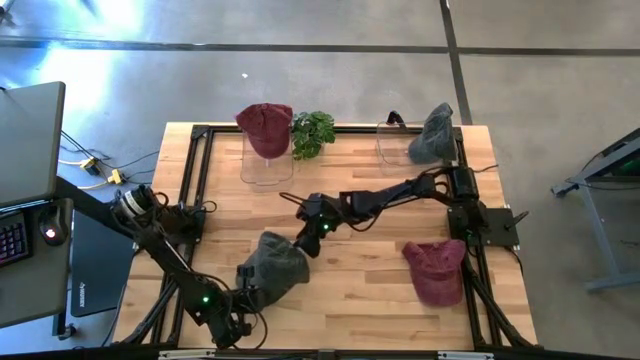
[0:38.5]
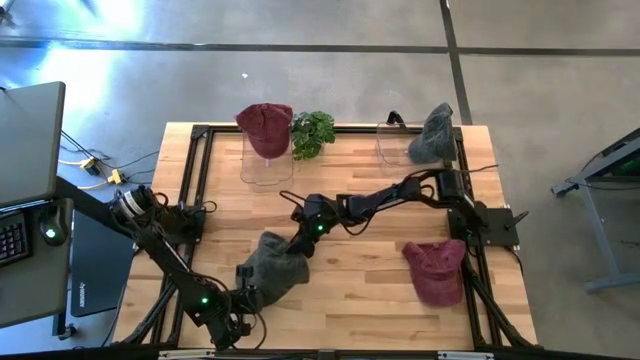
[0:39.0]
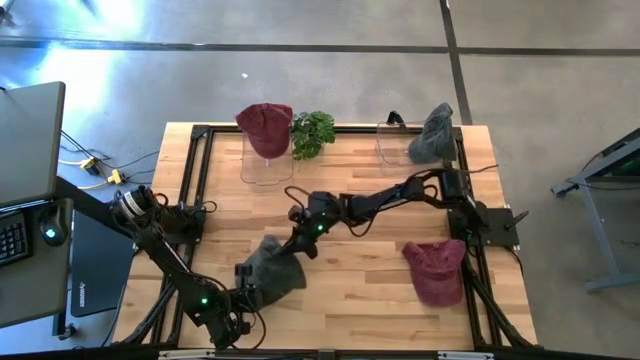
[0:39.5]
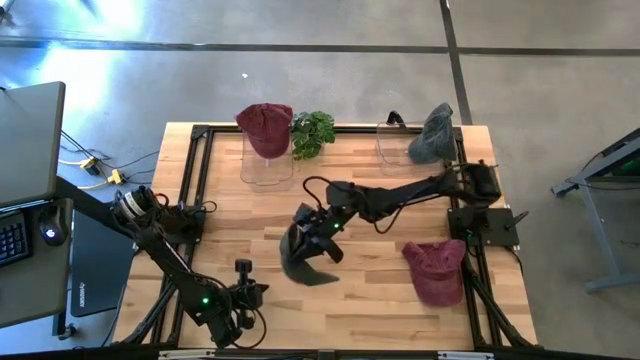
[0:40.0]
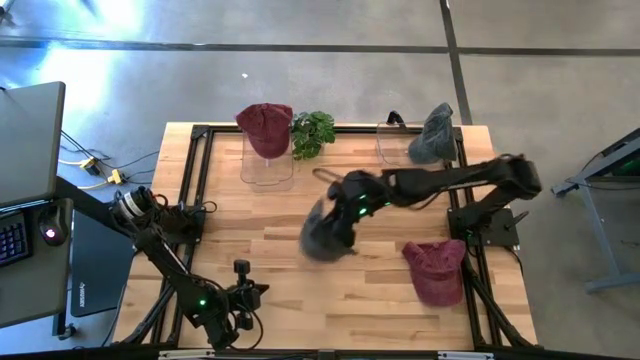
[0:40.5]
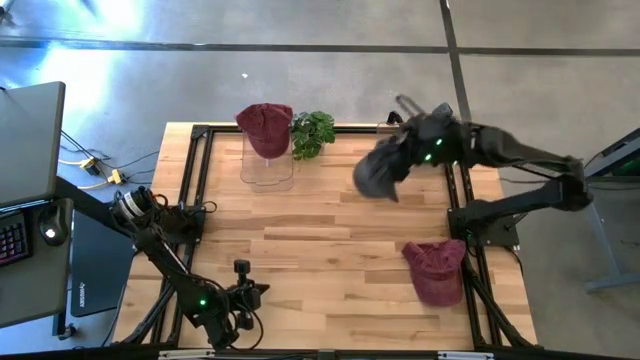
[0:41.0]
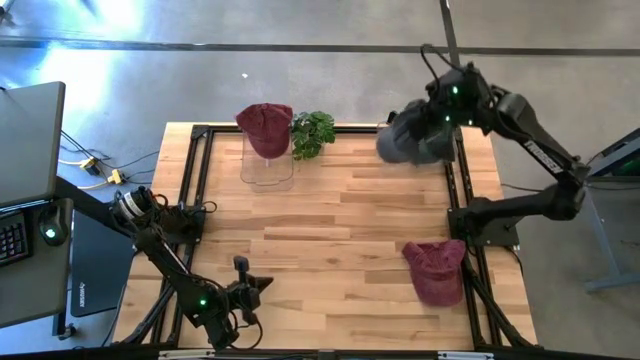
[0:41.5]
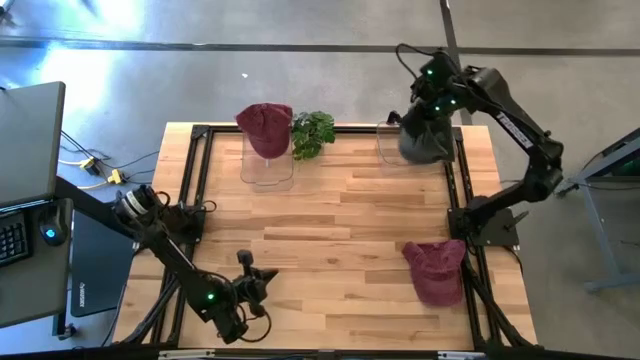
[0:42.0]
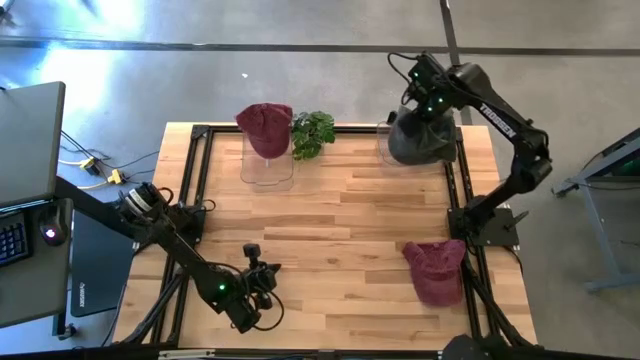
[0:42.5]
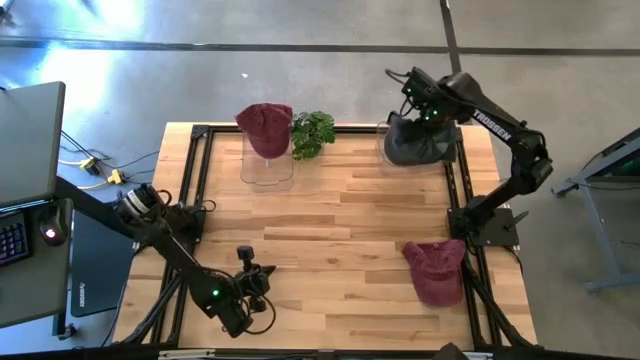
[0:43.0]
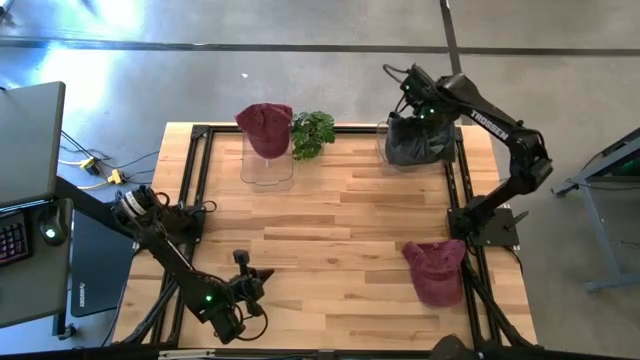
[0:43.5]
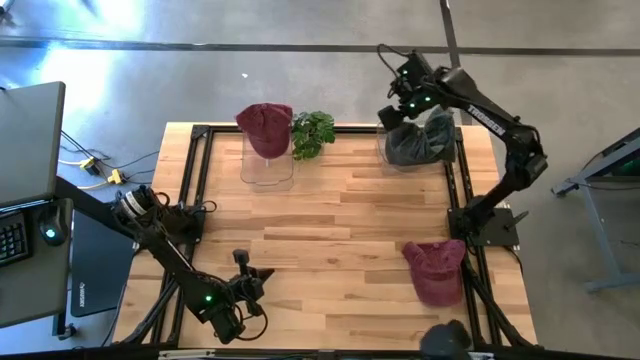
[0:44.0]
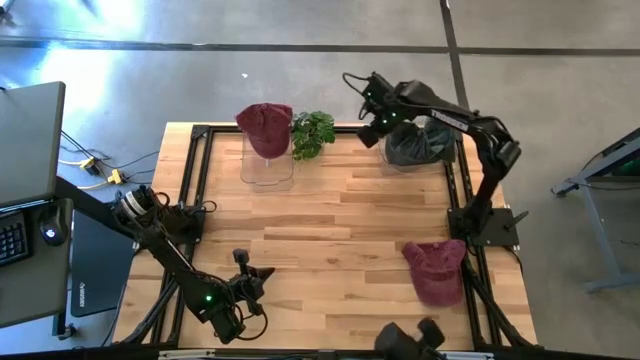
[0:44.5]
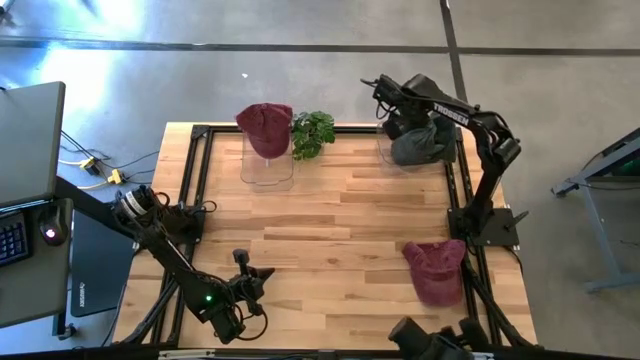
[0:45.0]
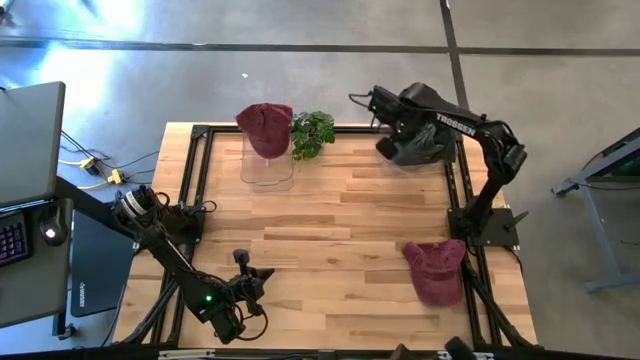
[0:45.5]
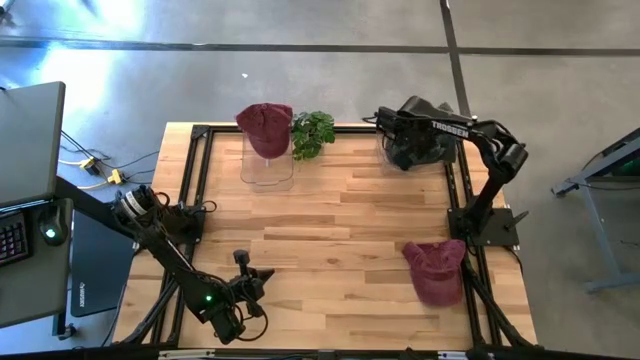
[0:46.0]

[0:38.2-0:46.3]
Task: Pick & Place hat
Put the black cap into the right transparent bin

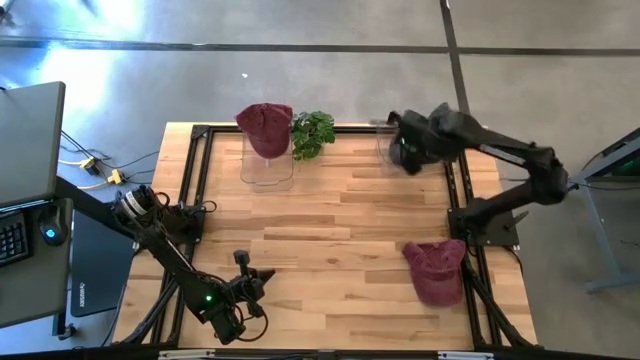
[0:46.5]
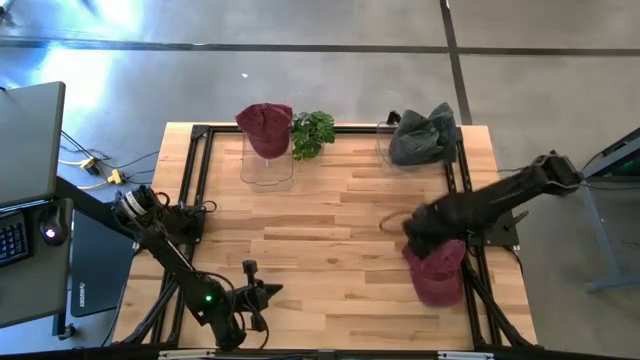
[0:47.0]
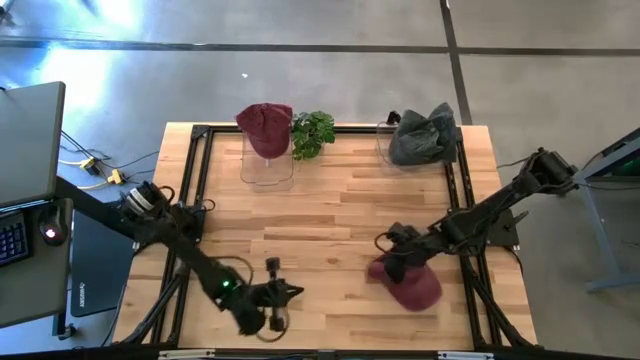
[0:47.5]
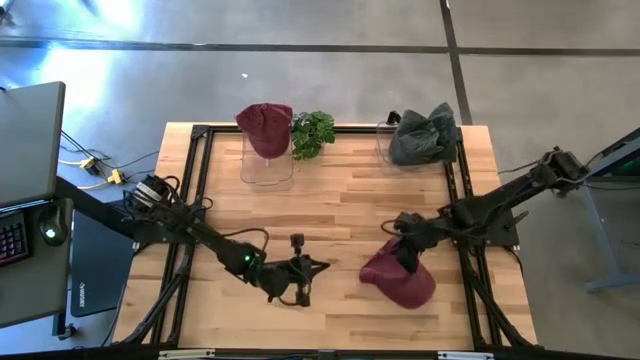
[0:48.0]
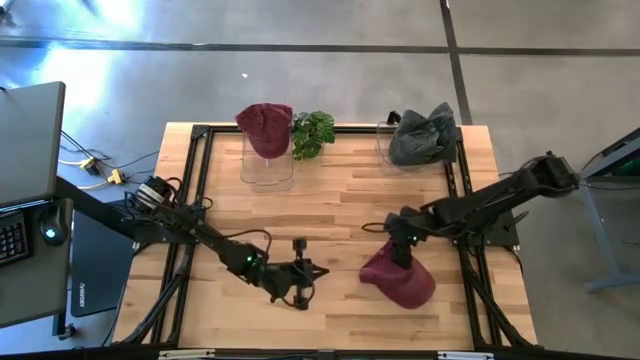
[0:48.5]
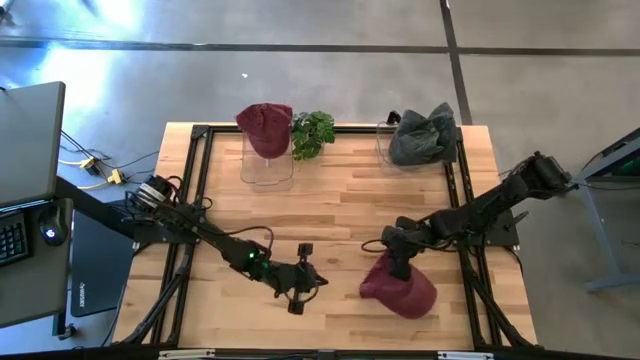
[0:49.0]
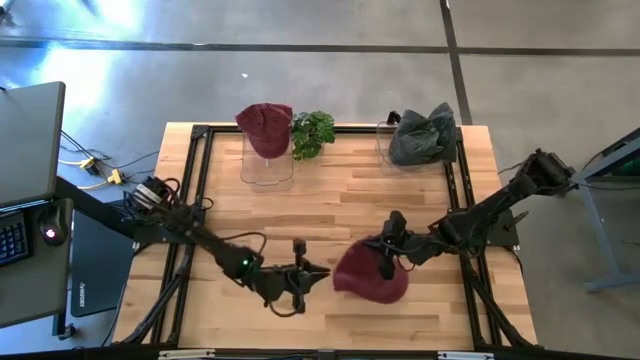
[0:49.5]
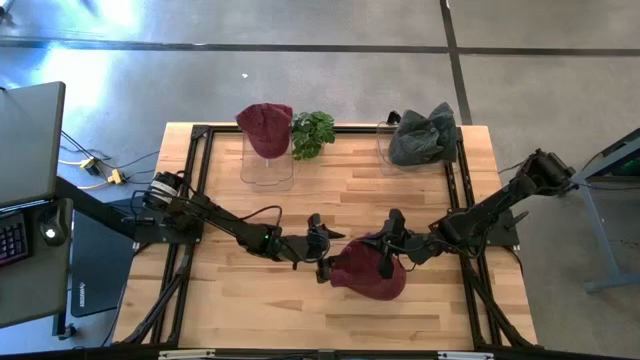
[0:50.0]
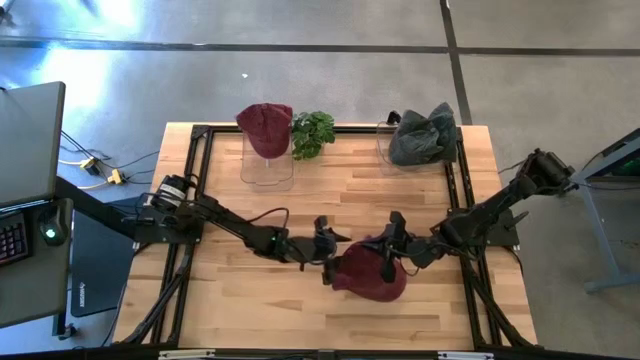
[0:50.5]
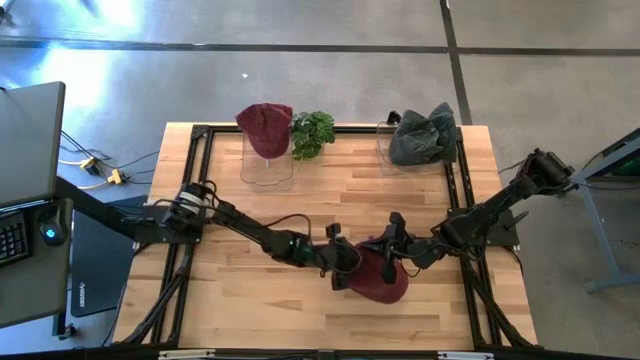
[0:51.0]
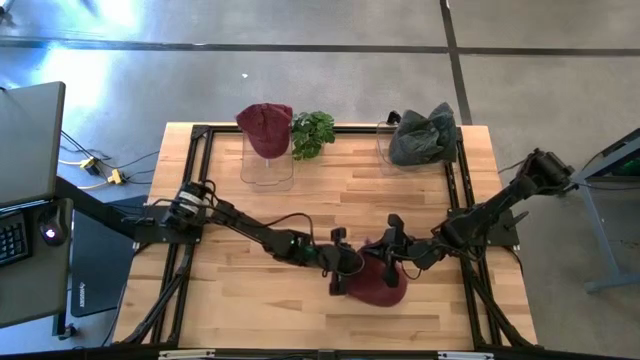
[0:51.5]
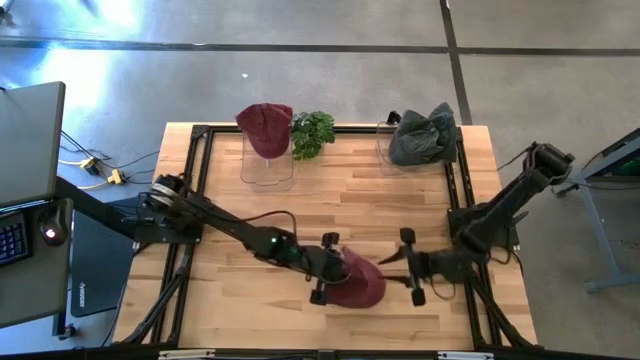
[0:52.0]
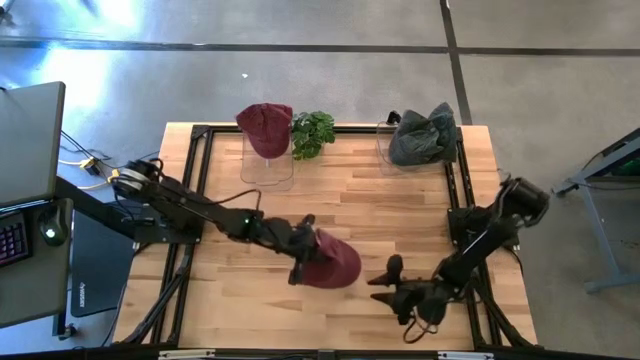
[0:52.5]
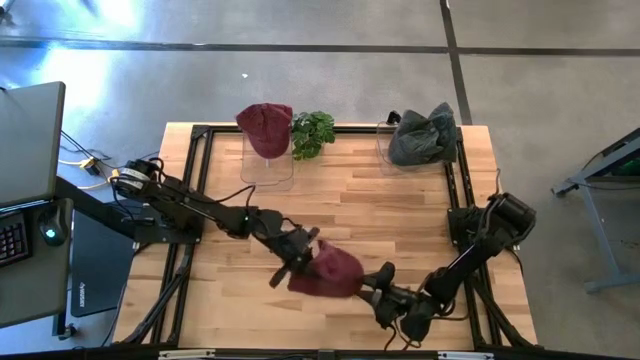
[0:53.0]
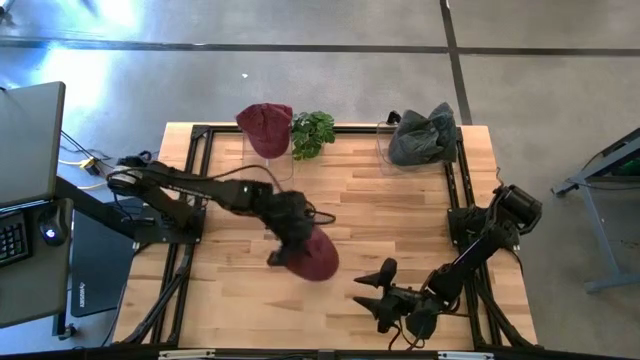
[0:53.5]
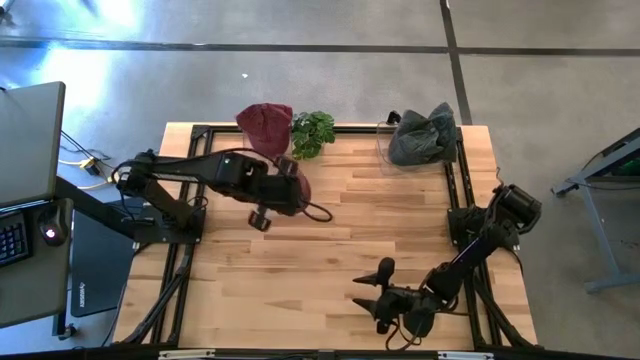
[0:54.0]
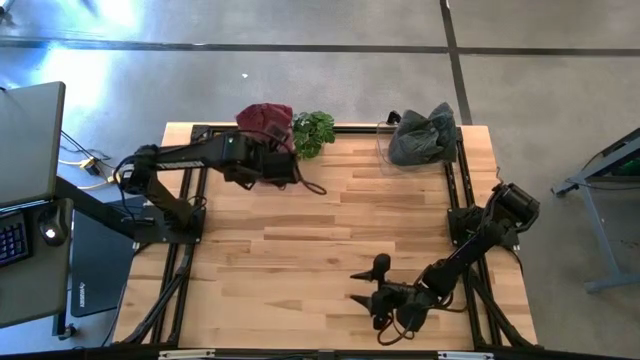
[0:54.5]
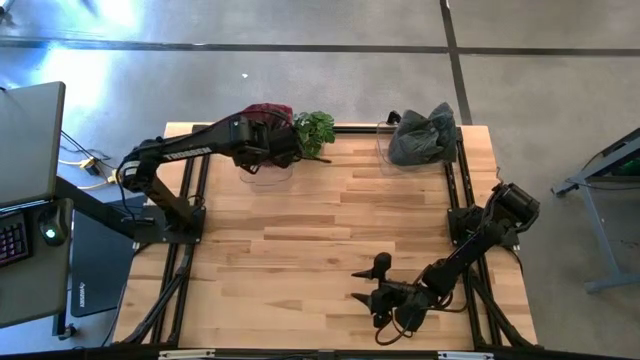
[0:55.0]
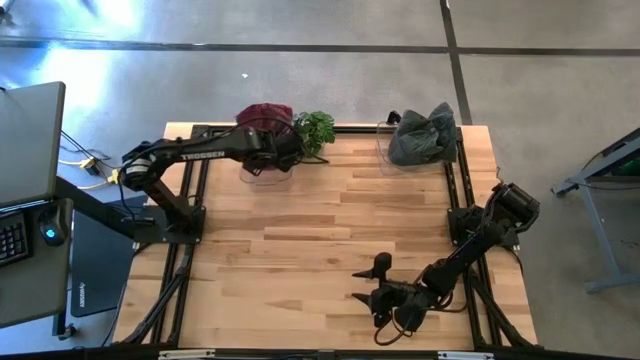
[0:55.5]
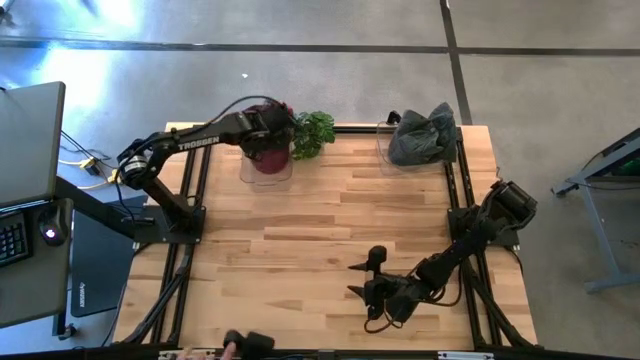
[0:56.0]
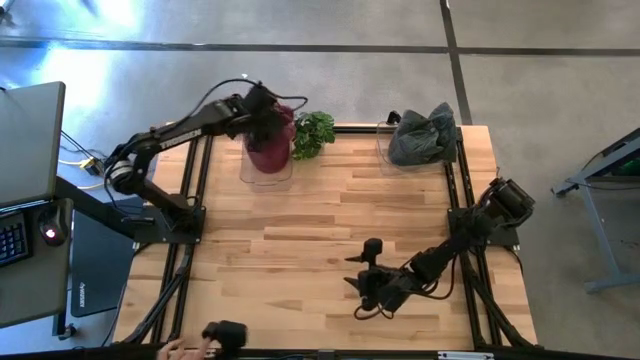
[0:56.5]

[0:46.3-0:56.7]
Put the red cap into the left transparent bin

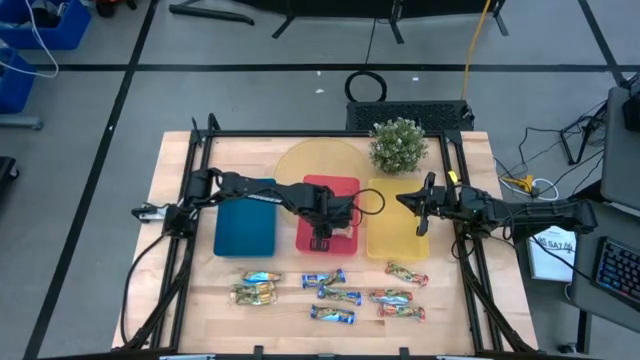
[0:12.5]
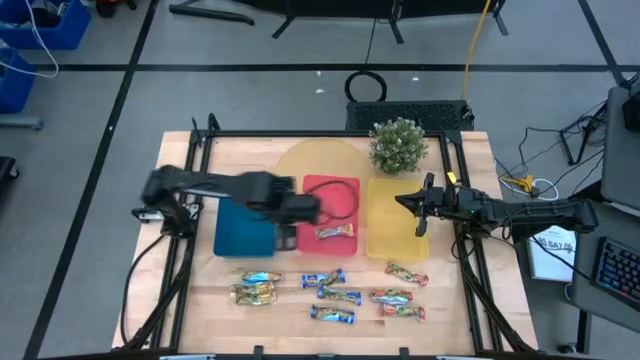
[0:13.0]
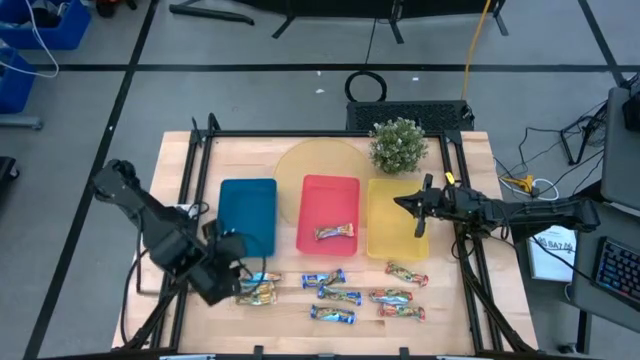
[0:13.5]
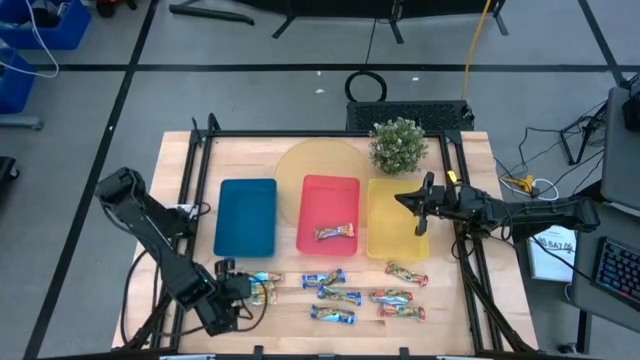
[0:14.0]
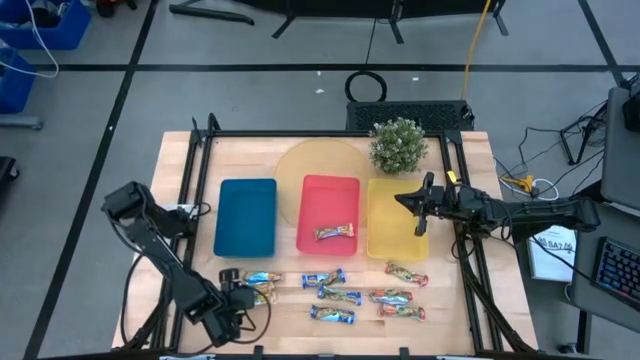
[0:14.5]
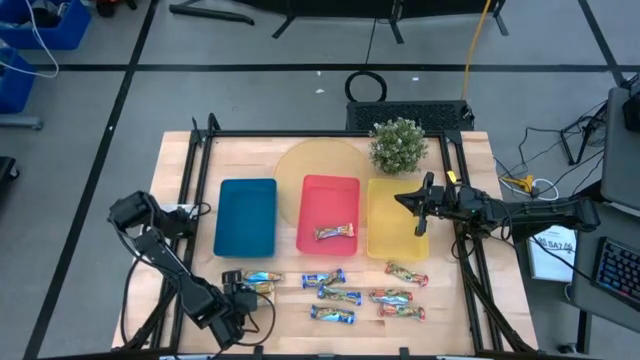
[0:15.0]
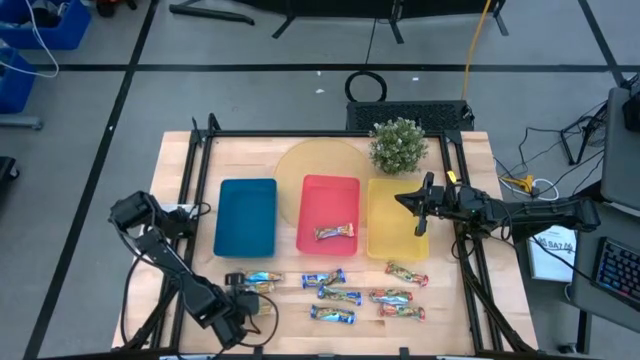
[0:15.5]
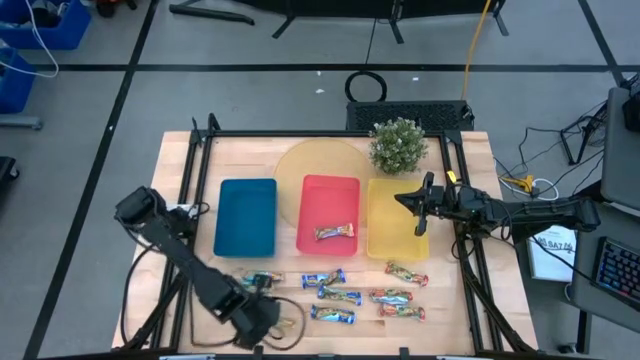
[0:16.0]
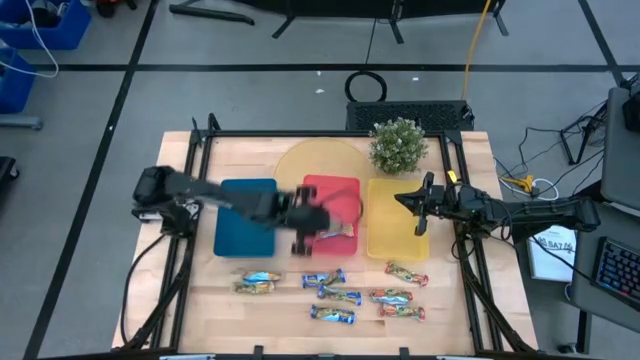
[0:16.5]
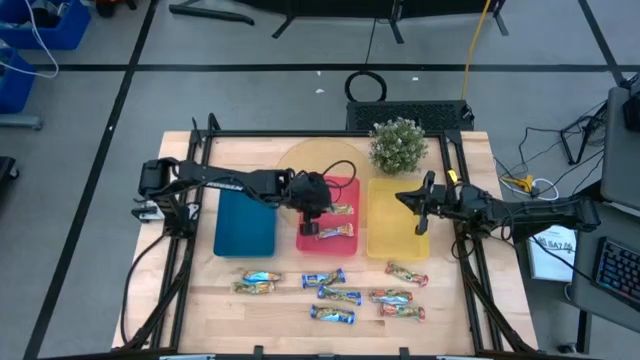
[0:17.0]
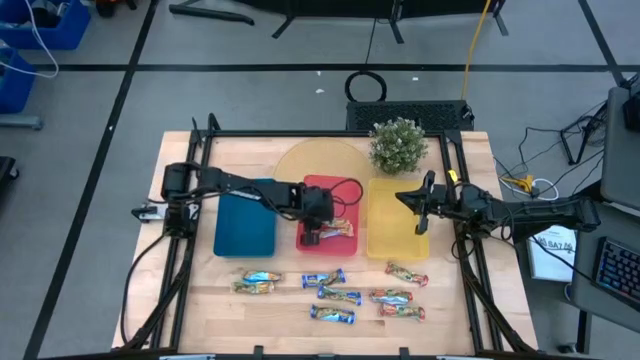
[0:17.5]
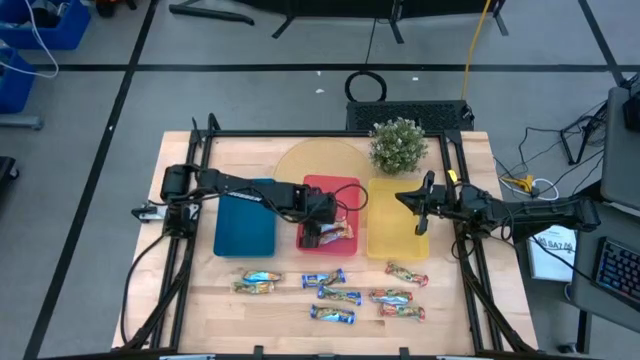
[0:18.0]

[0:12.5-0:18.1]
Task: Pick and place Granola Bars by type
Put the yellow granola bar into the red bin
